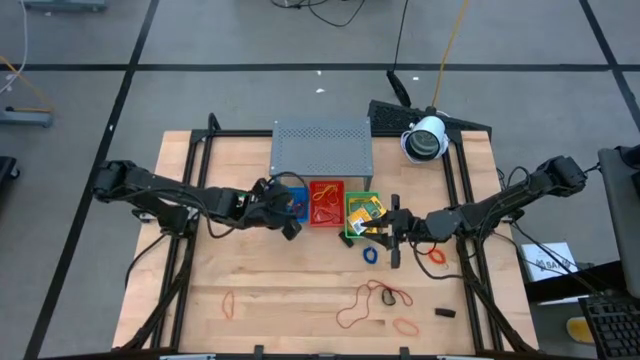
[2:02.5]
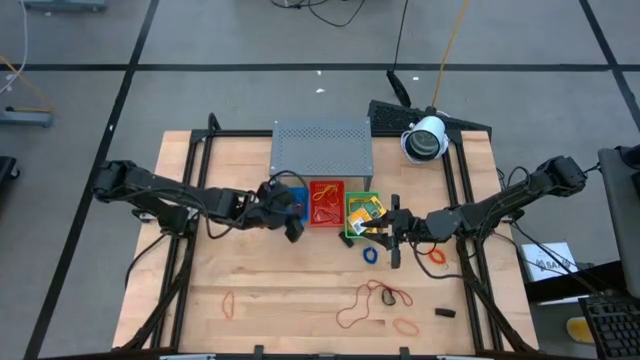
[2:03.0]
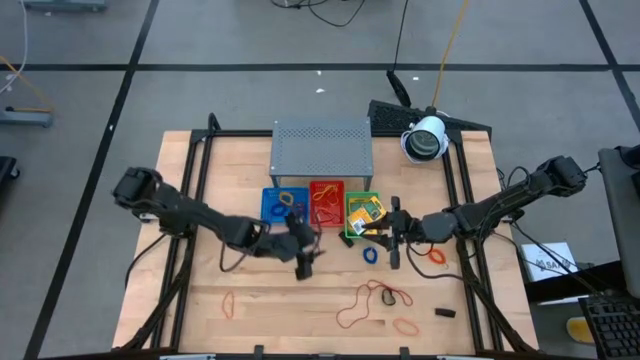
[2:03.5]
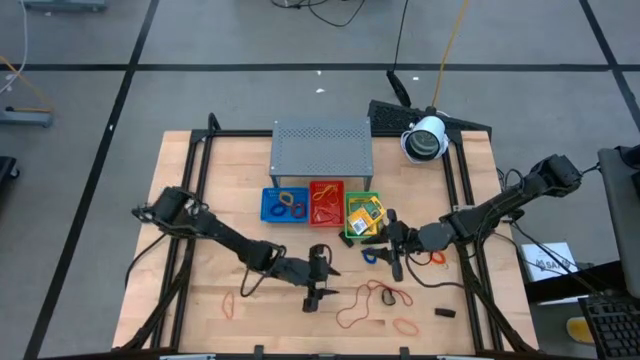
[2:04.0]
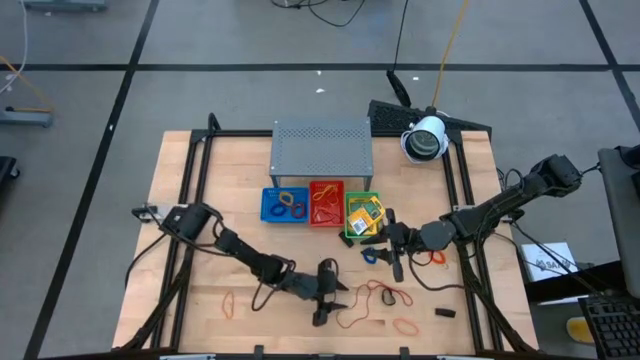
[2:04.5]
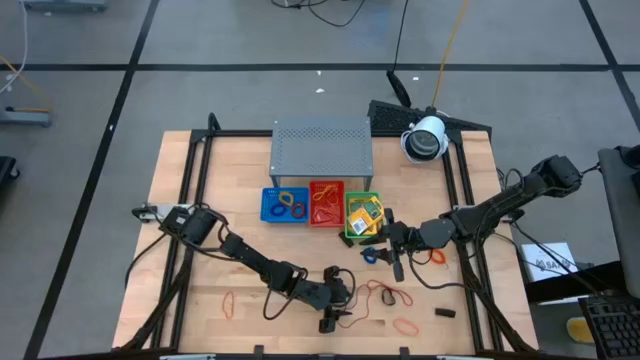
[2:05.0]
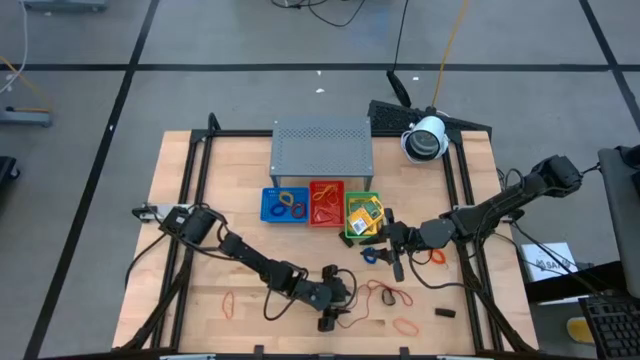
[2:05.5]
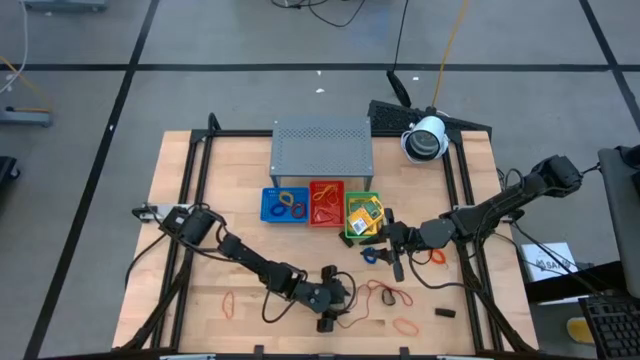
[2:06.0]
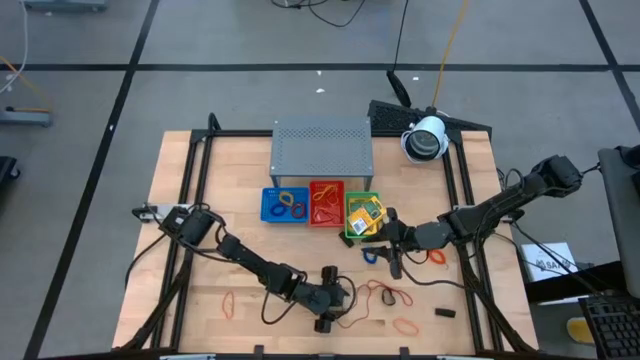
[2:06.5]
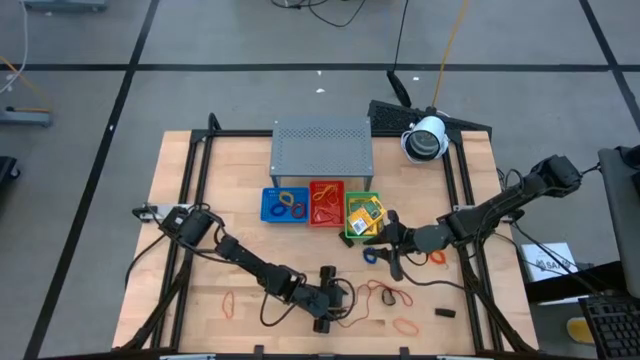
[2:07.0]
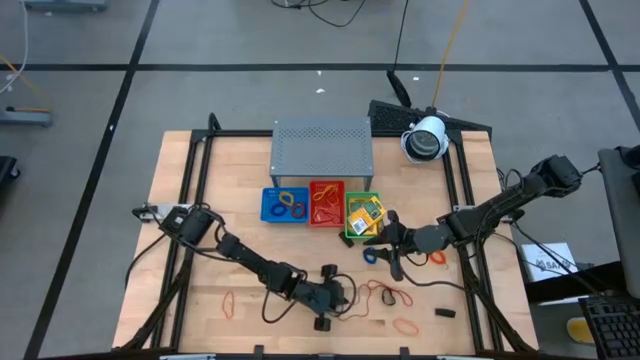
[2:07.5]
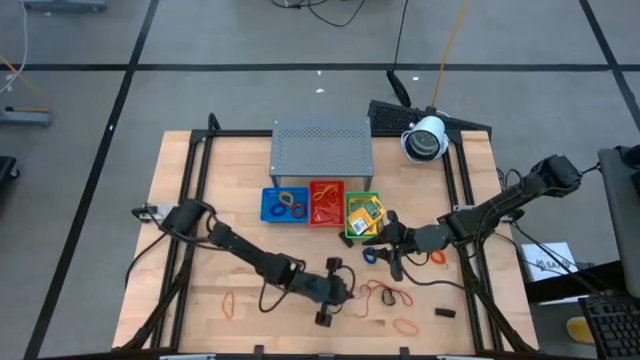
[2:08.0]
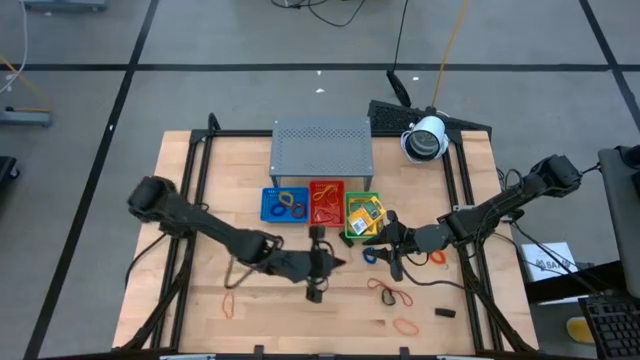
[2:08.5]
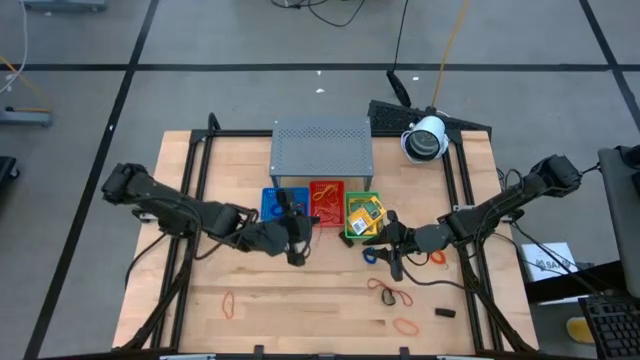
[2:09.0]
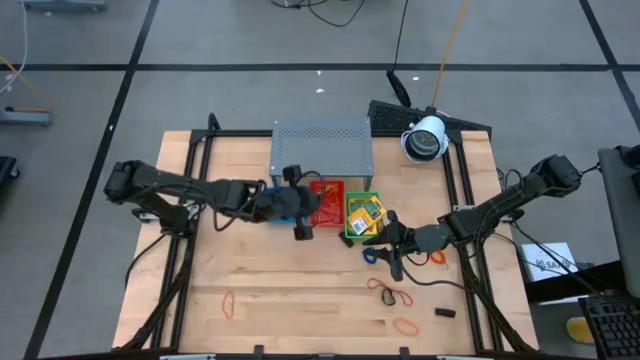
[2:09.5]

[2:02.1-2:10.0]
Task: Pick & Place Office Desk Supplies
Put the red rubber band into the red bin

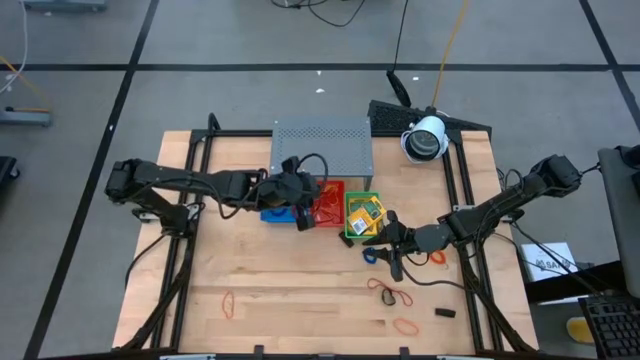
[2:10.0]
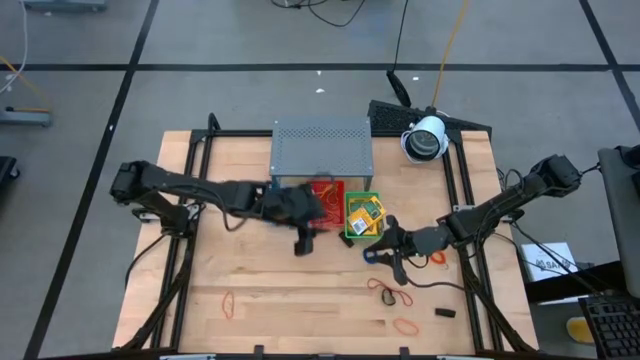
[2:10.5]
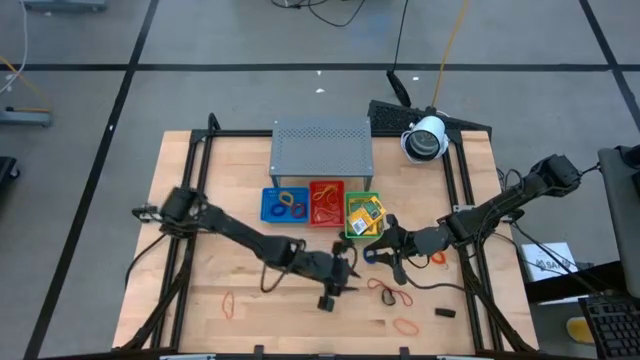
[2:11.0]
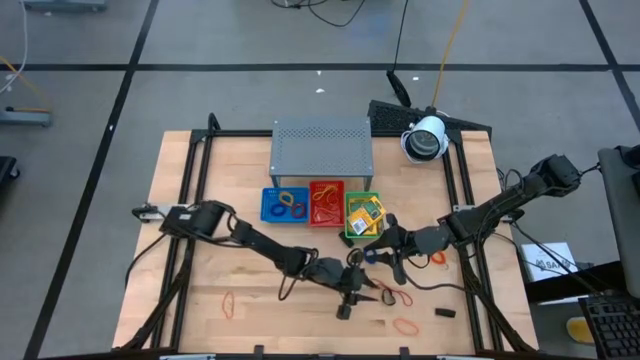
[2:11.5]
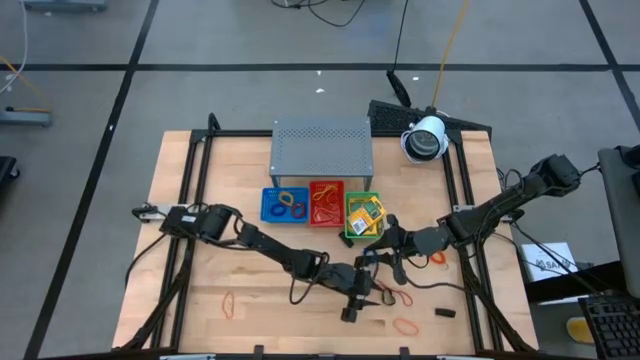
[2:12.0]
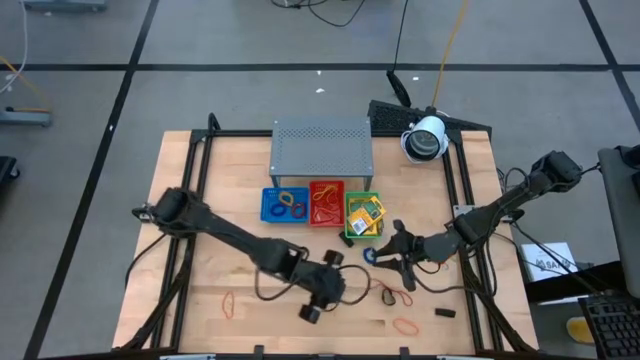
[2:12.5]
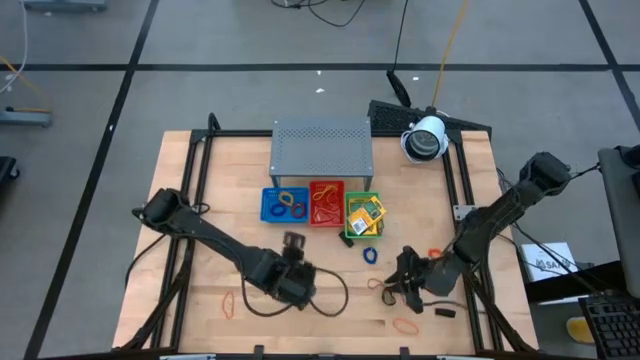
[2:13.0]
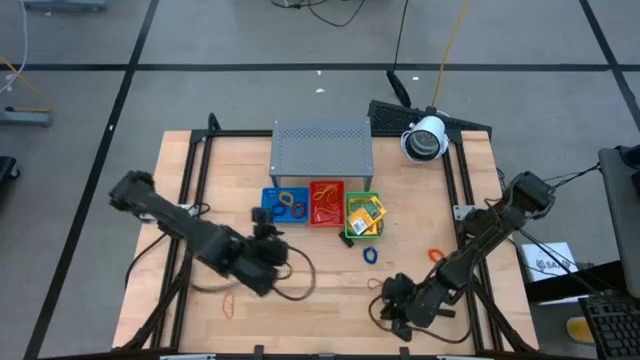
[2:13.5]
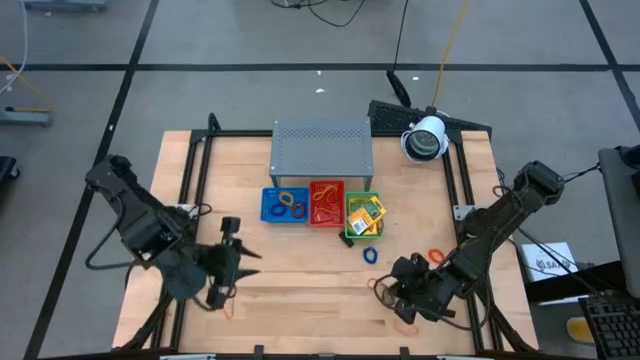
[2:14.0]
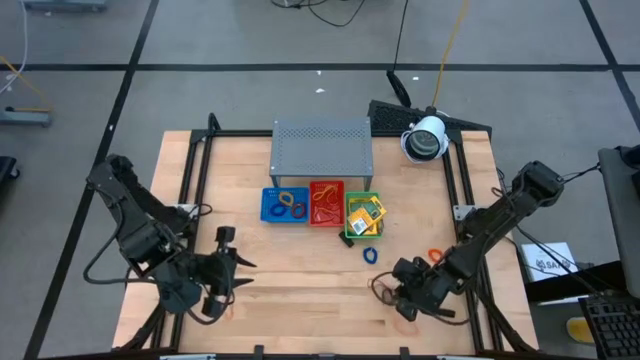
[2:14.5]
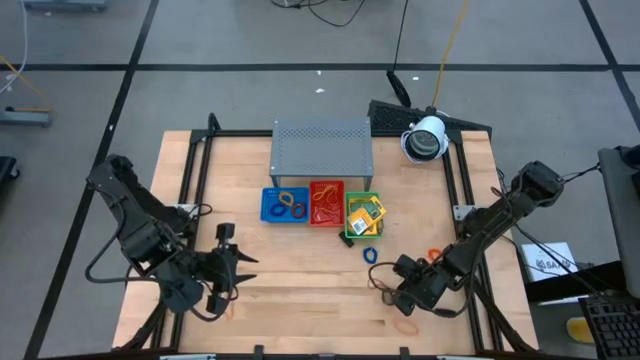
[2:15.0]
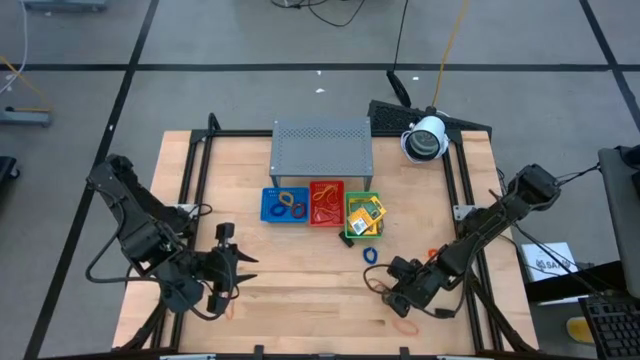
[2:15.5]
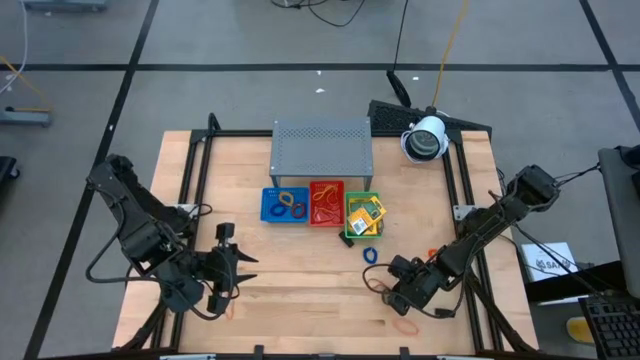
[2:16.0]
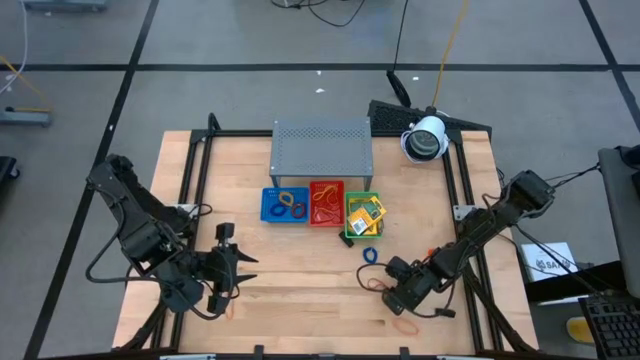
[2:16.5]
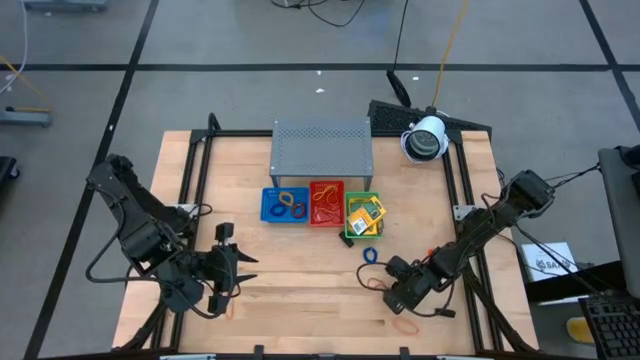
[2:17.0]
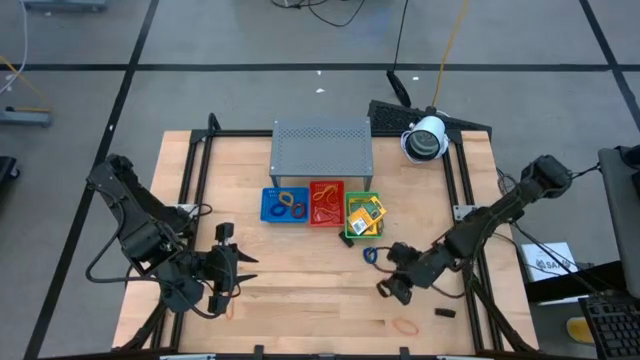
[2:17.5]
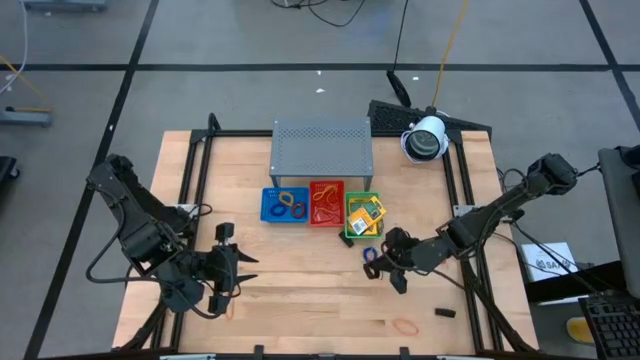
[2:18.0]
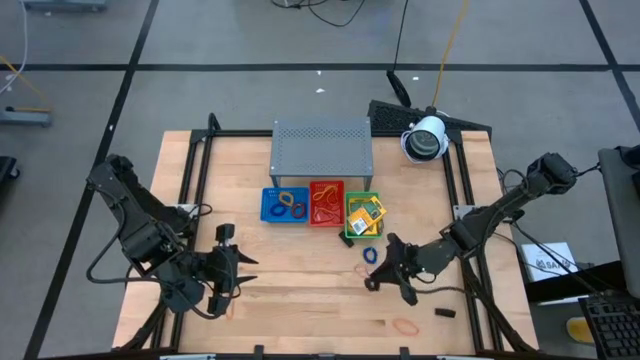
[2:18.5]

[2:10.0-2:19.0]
Put the red rubber band into the red bin

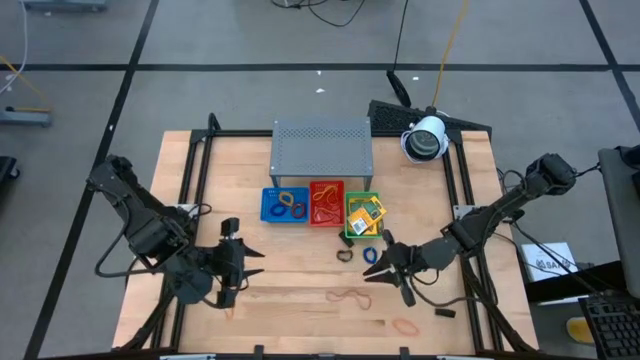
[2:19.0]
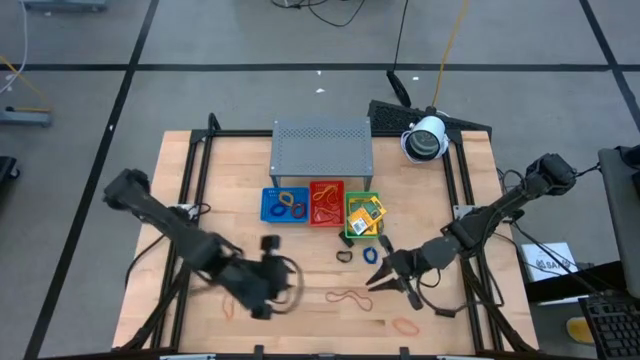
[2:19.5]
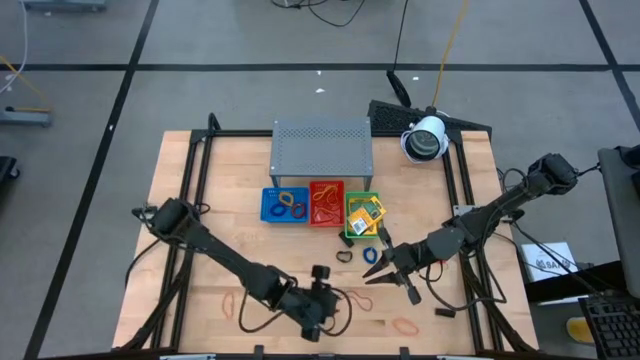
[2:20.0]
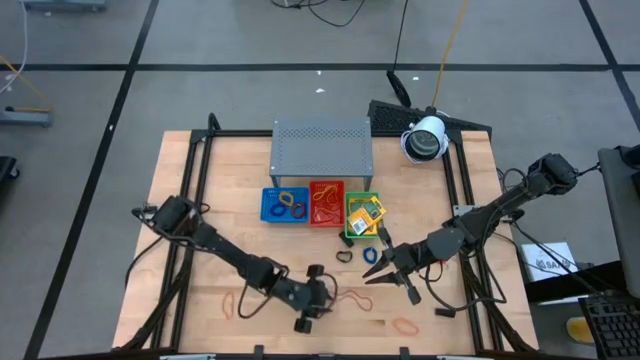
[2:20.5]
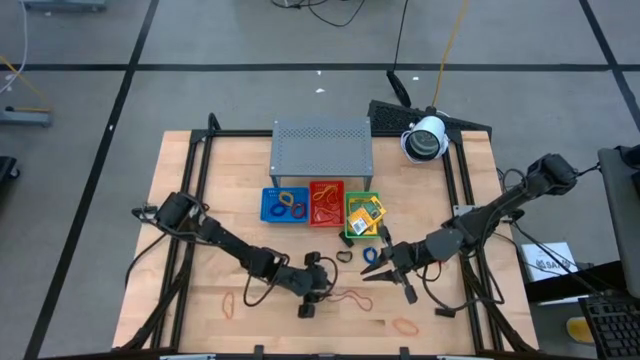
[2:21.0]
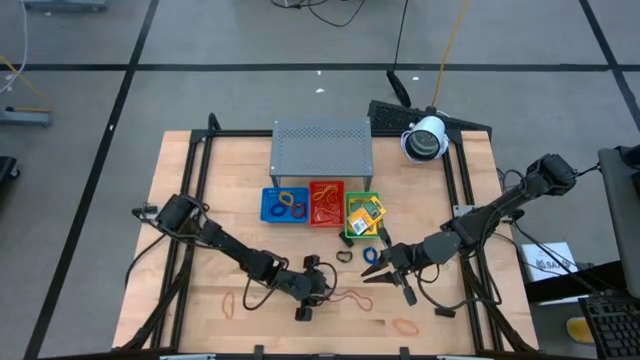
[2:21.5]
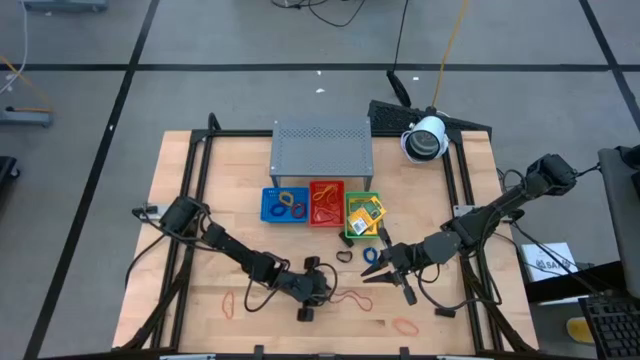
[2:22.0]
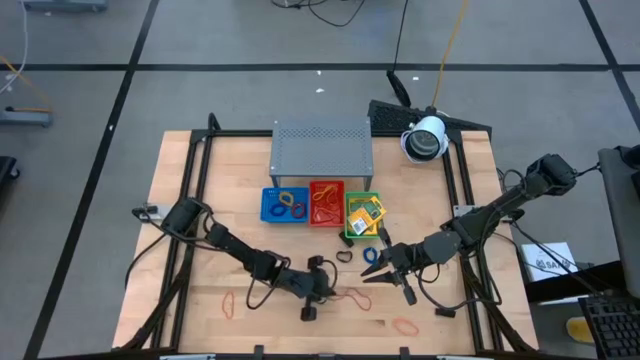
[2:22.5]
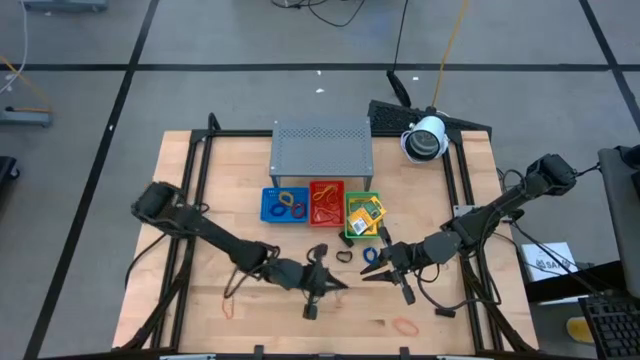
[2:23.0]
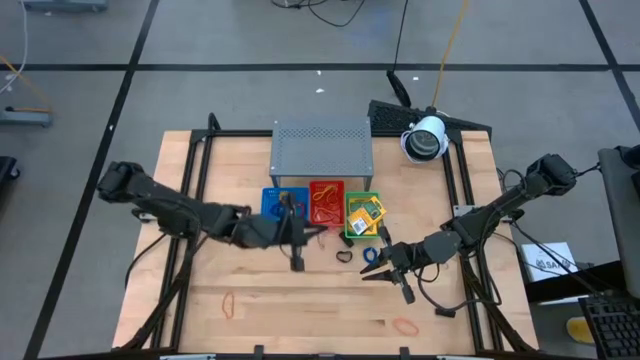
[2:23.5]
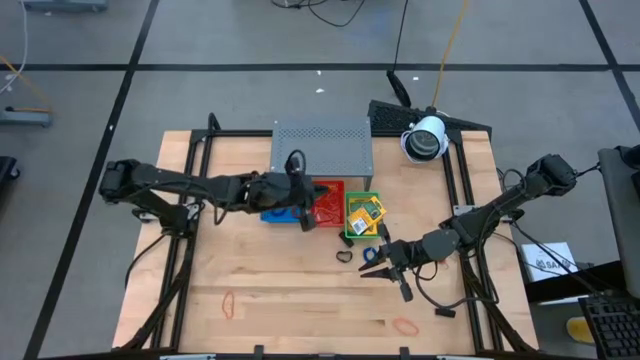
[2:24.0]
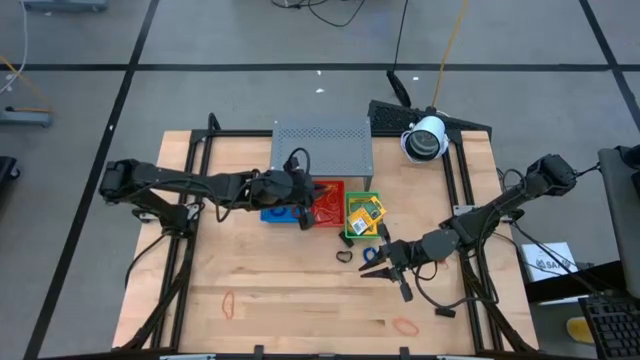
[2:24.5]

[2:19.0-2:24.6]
Put the red rubber band into the red bin
